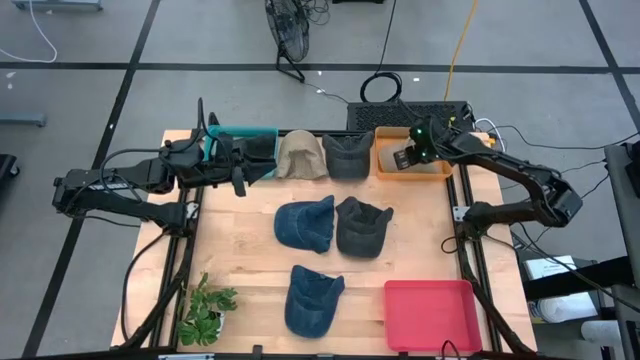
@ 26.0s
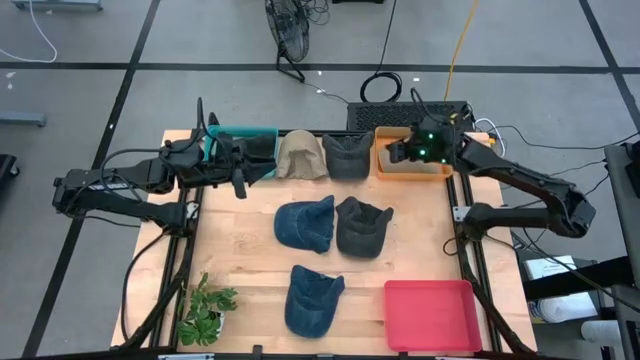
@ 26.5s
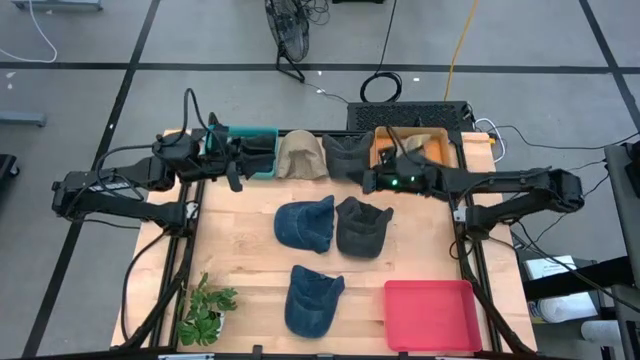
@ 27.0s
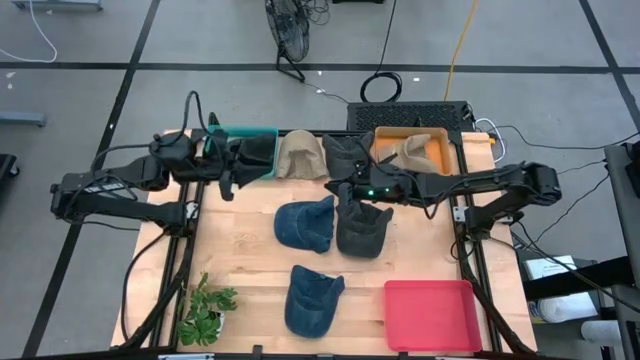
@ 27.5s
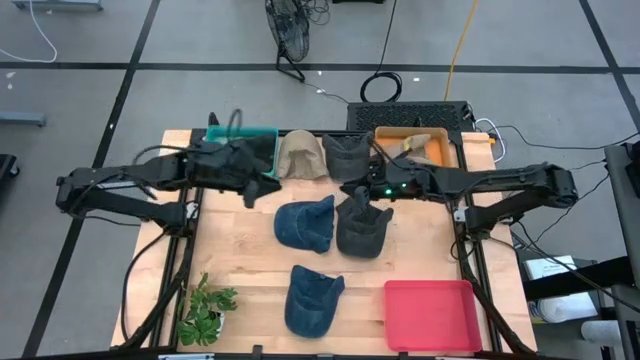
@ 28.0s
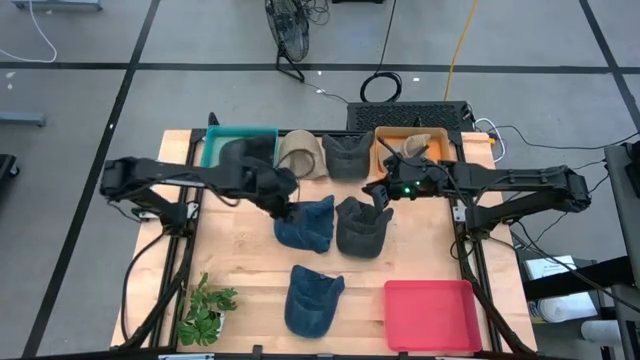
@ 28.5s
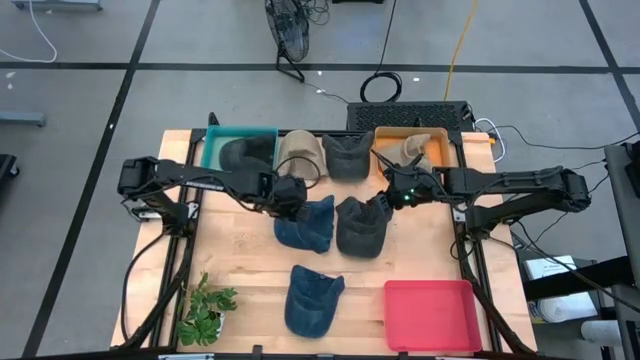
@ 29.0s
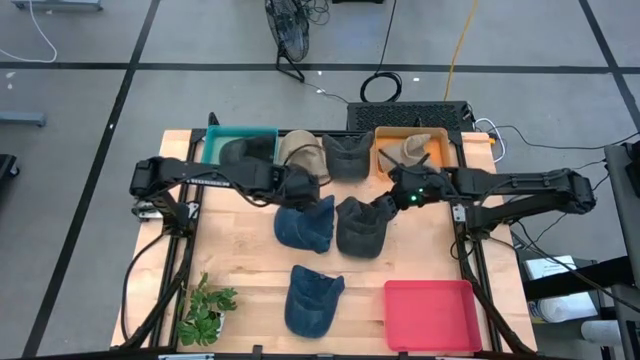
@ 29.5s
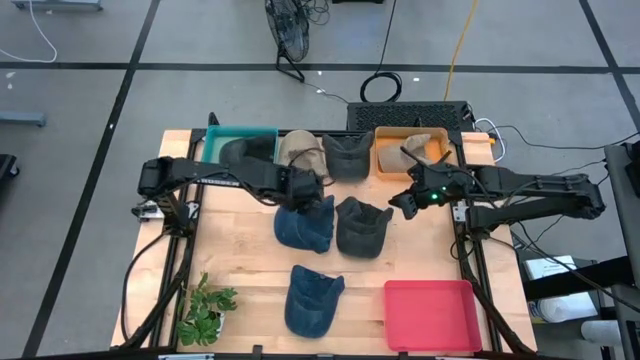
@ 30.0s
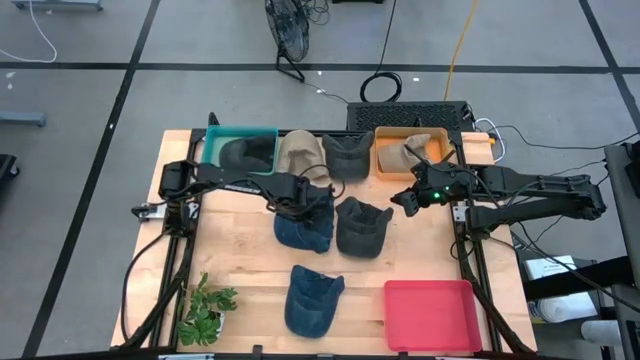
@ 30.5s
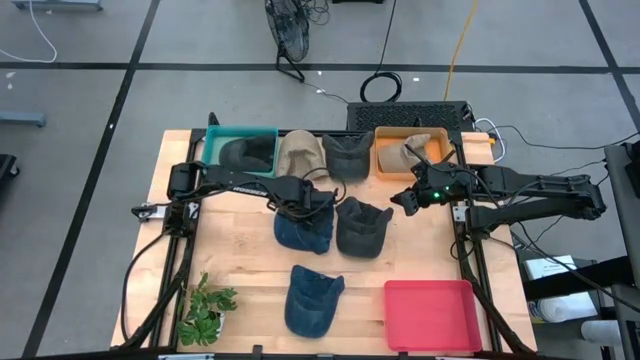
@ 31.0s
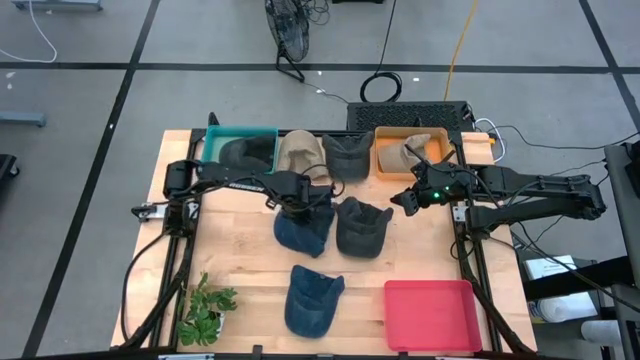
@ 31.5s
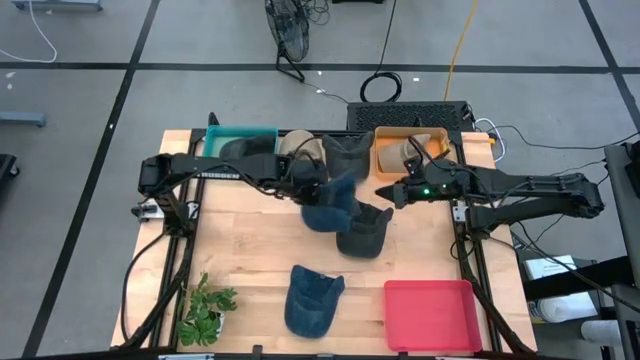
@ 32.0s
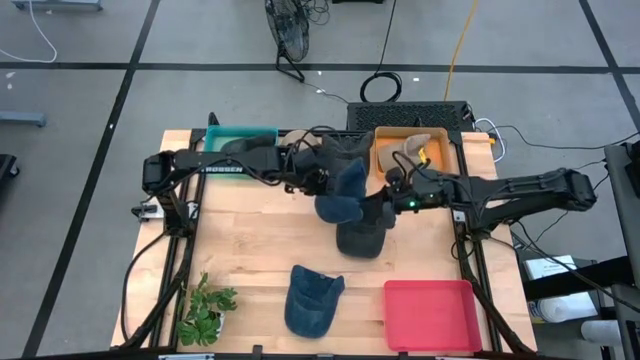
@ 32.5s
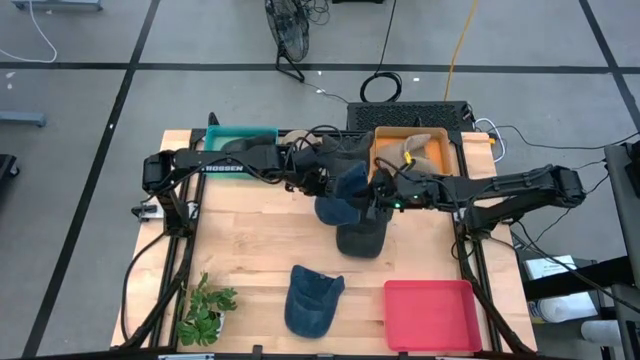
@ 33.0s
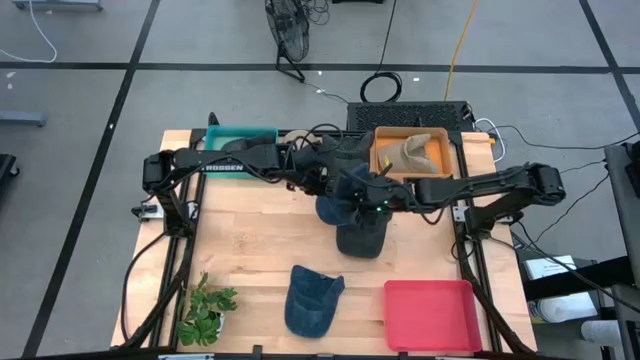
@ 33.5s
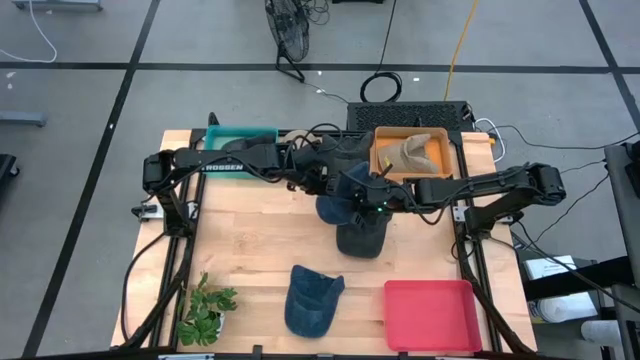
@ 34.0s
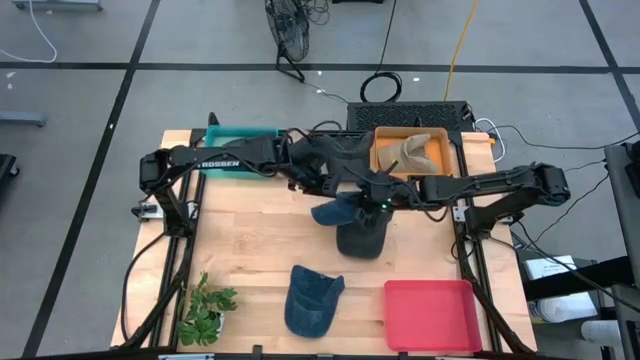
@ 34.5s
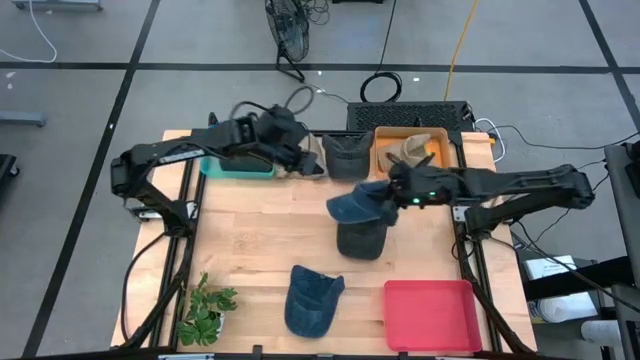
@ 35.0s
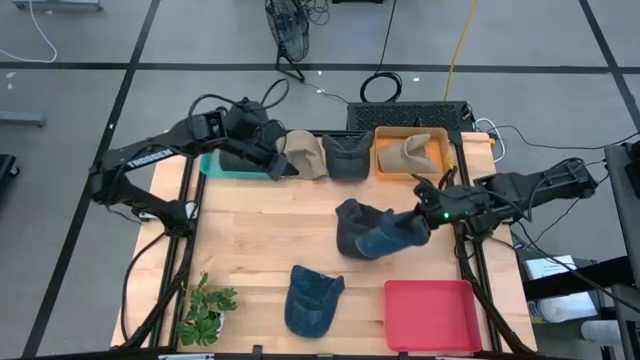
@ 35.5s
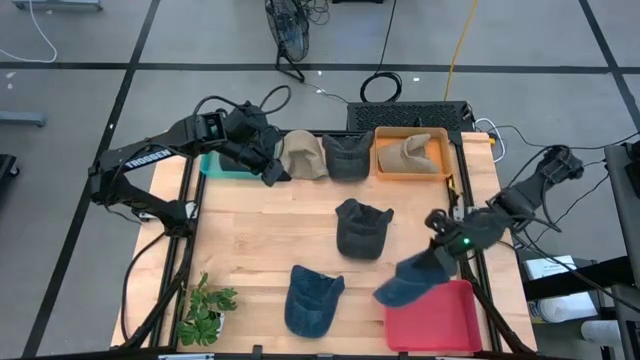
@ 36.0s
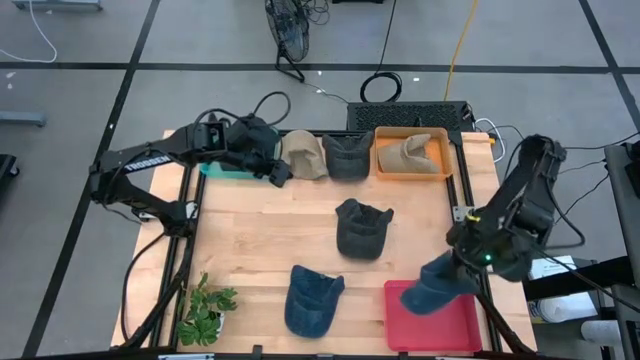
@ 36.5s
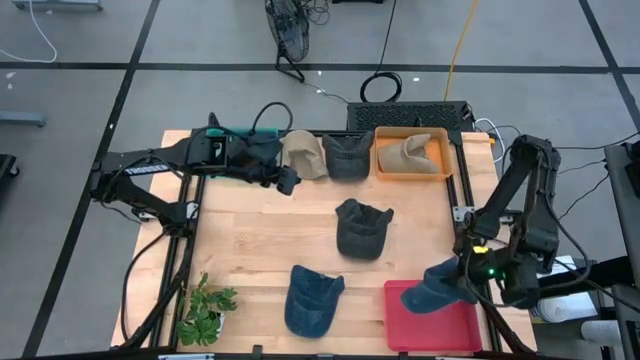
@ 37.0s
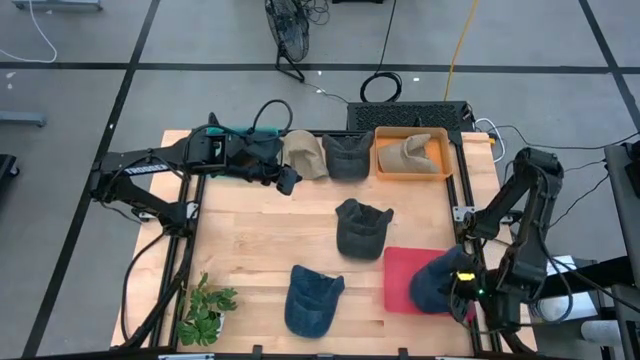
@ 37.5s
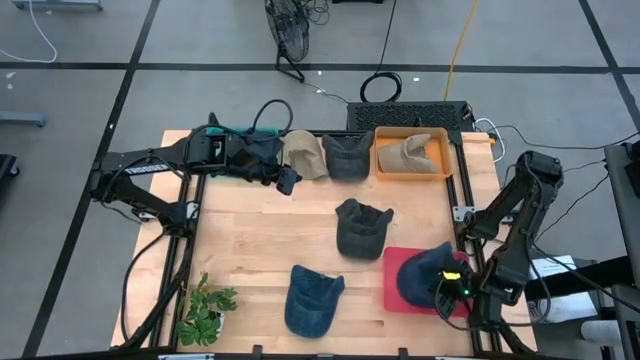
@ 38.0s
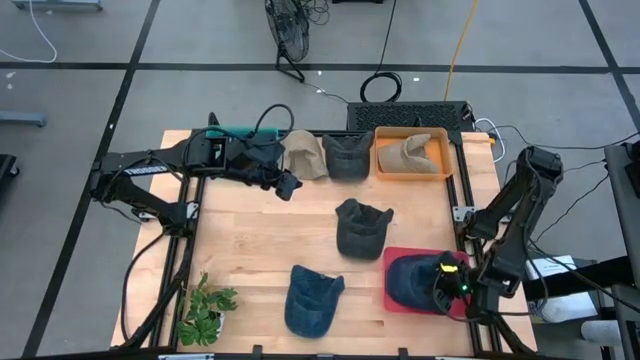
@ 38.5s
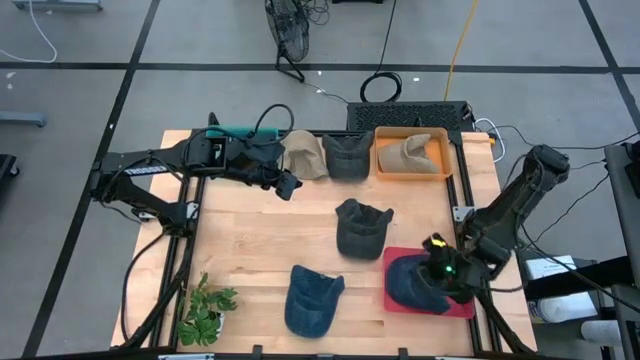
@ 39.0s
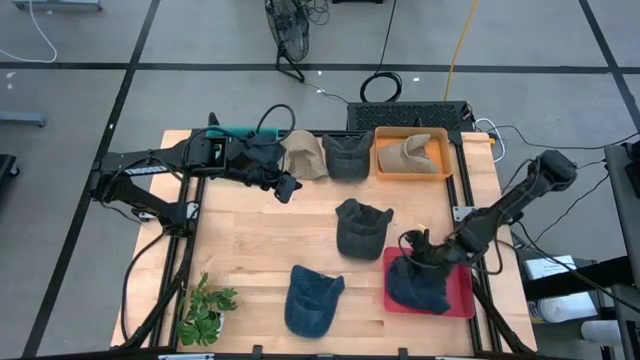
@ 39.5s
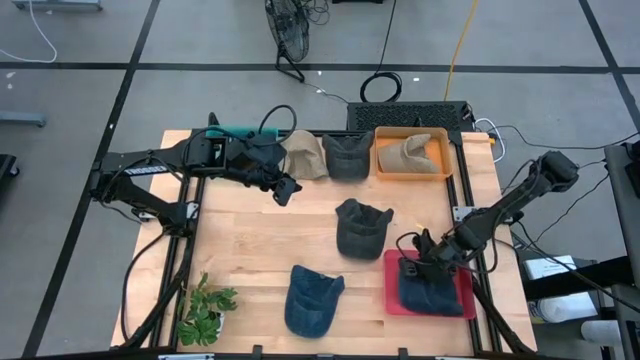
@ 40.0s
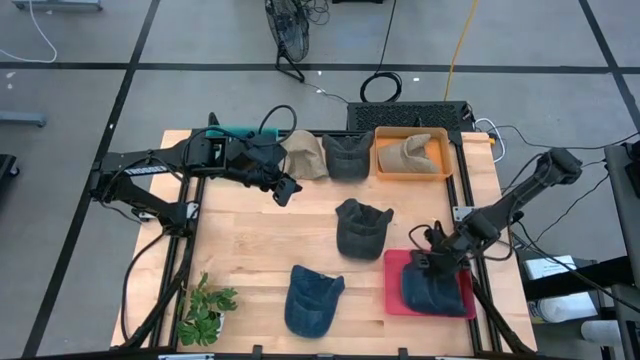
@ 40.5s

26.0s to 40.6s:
Task: Pick & Place hat
Put the top blue cap into the red bin

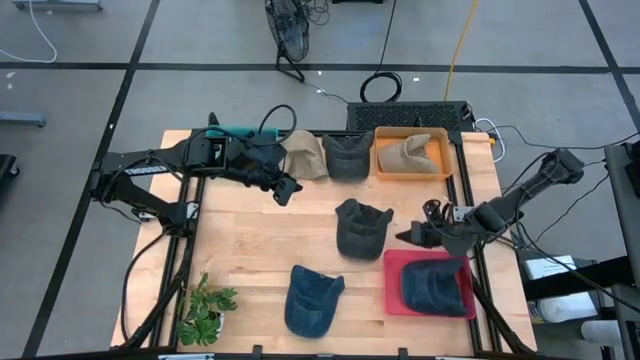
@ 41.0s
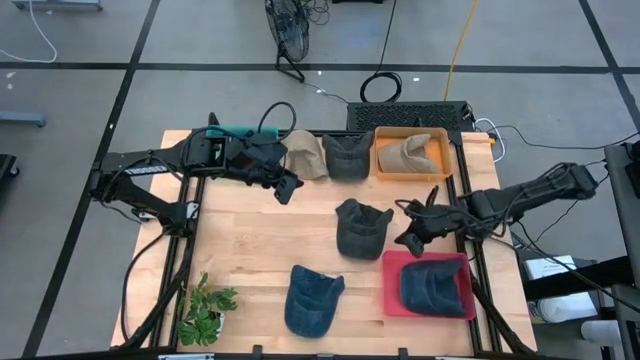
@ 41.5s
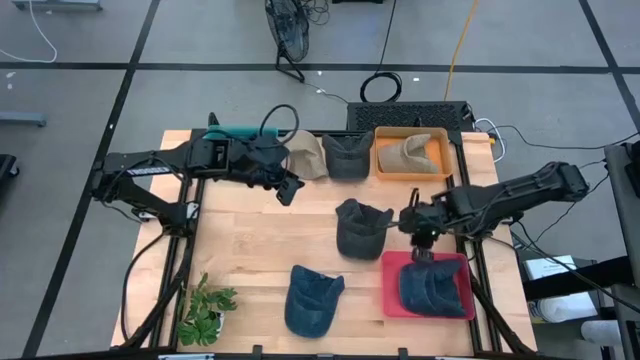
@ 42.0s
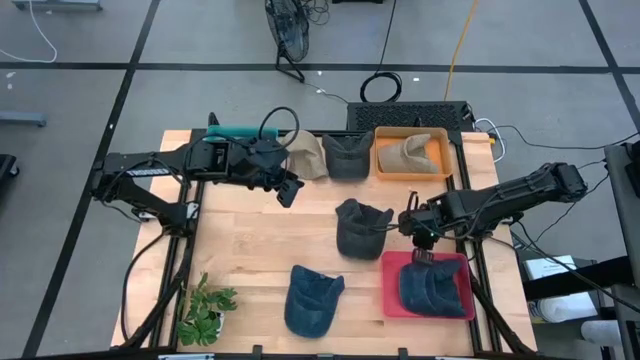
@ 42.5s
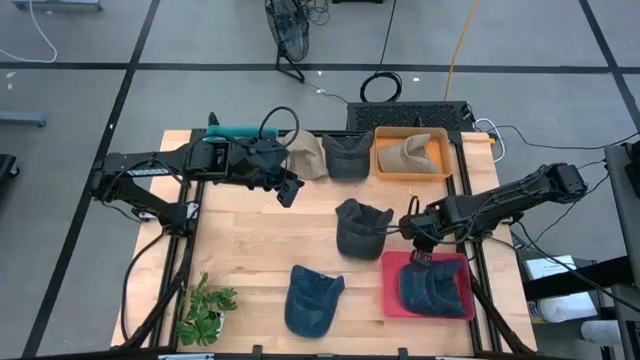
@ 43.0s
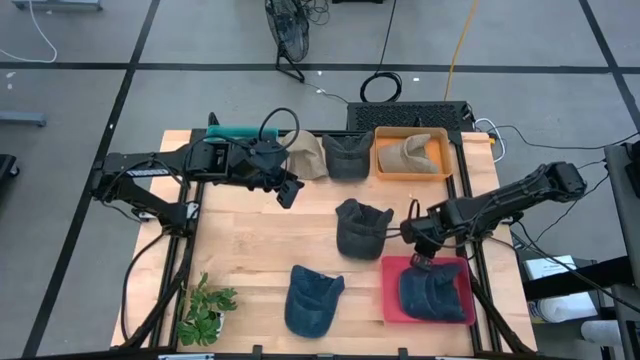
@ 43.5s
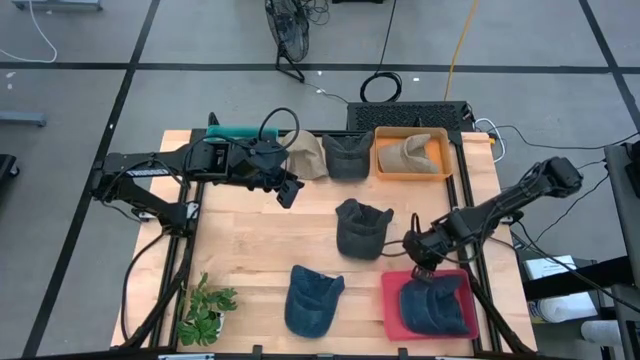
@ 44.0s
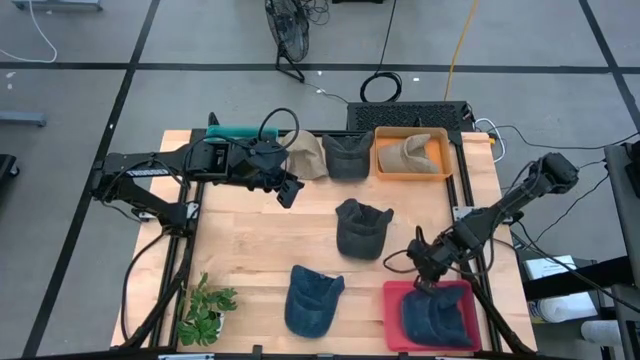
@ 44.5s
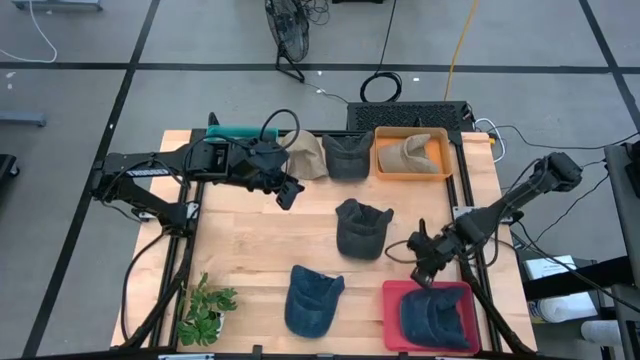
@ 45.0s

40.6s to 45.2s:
Adjust the red bin

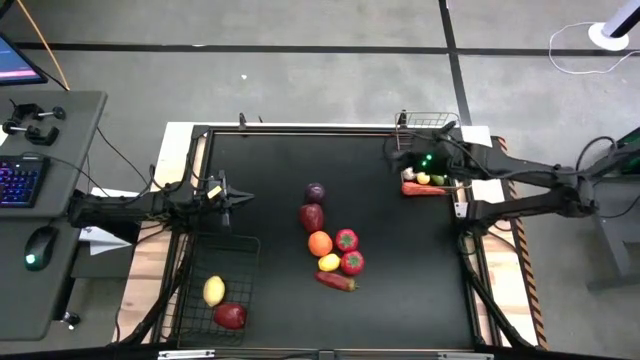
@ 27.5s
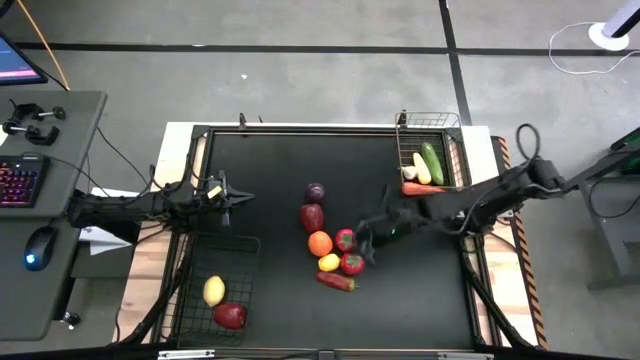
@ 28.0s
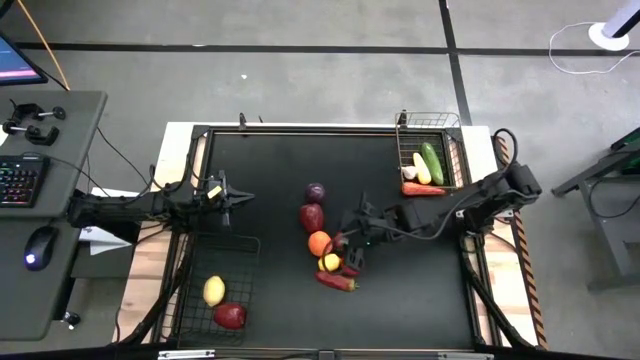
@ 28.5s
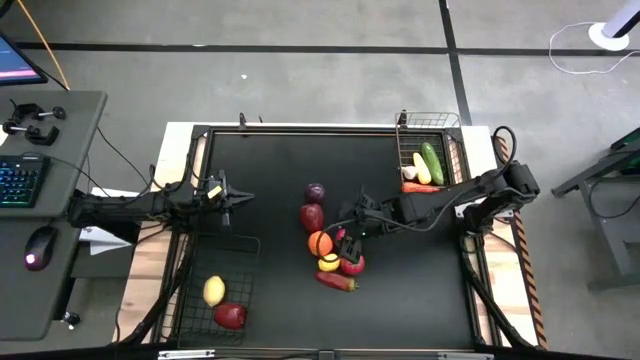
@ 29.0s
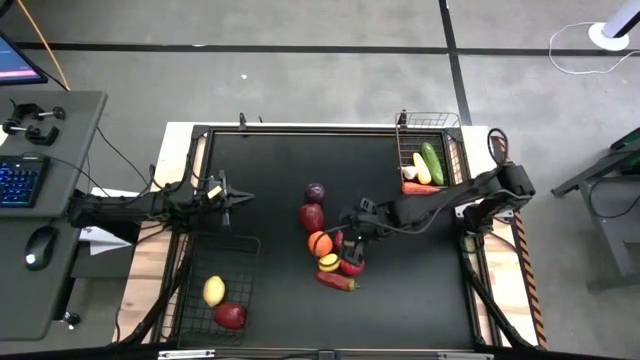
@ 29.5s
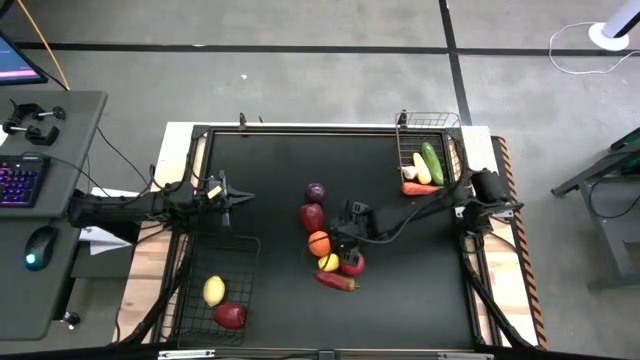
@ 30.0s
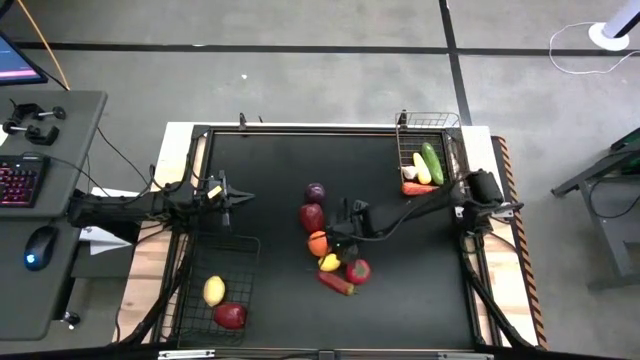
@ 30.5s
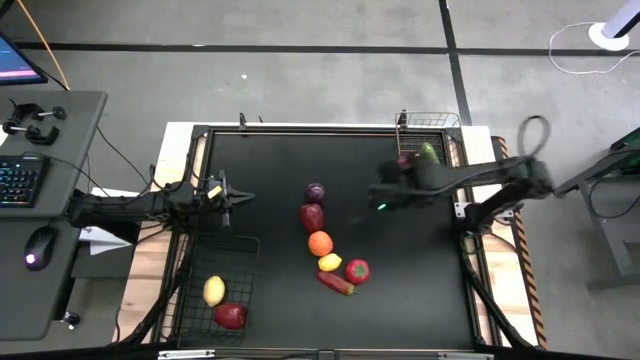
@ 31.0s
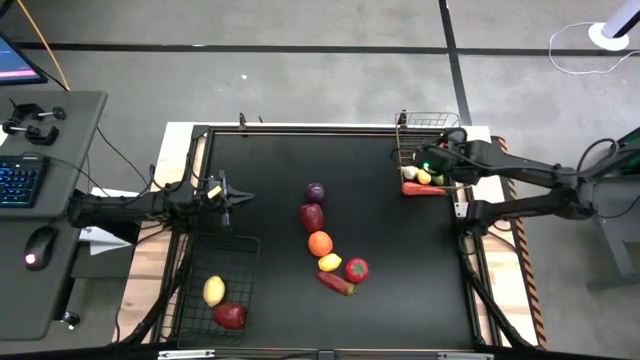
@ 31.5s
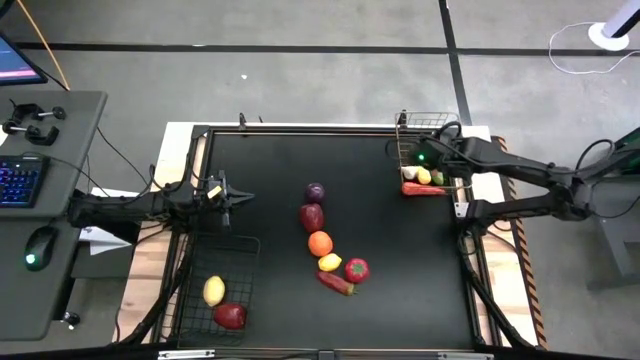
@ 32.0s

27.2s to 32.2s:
Task: Sort produce into baskets
Put the top tomato into the right wire basket
